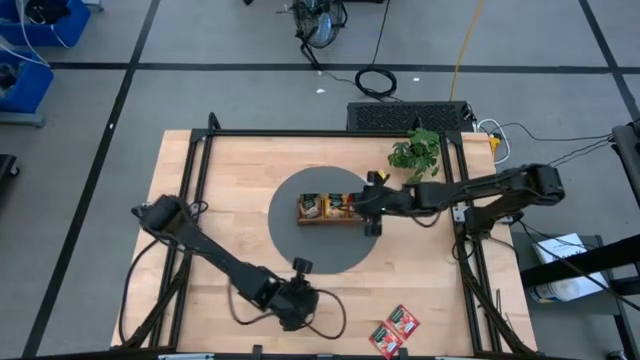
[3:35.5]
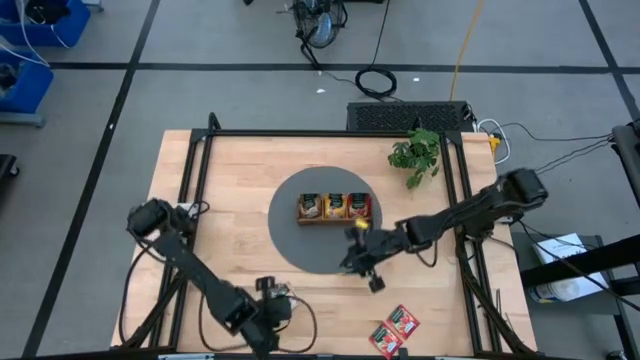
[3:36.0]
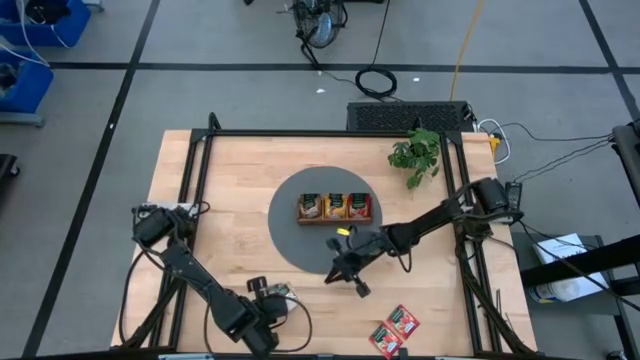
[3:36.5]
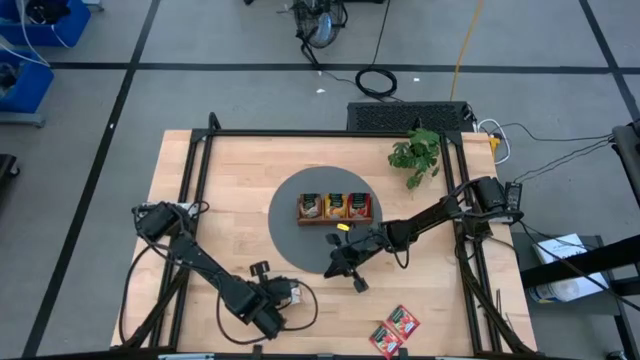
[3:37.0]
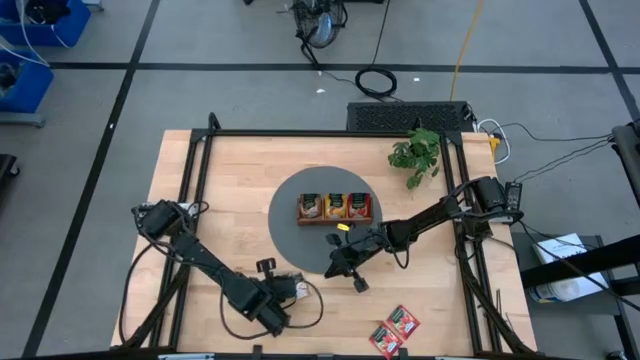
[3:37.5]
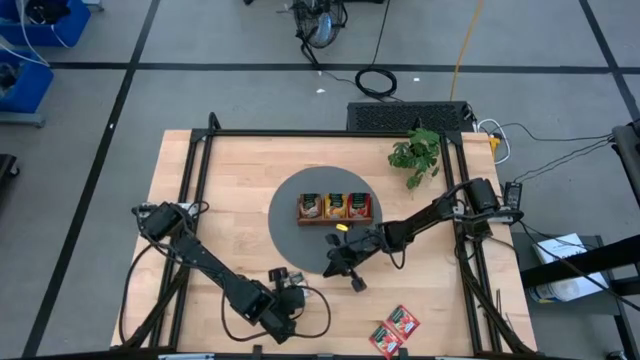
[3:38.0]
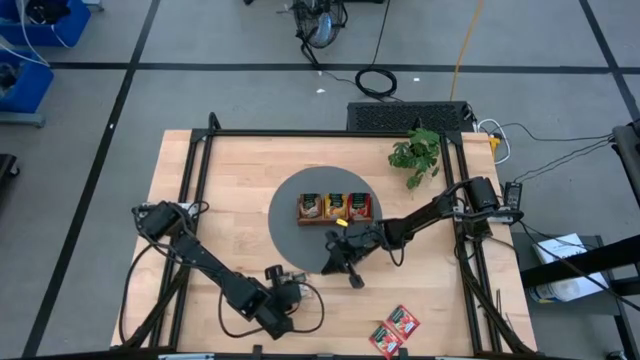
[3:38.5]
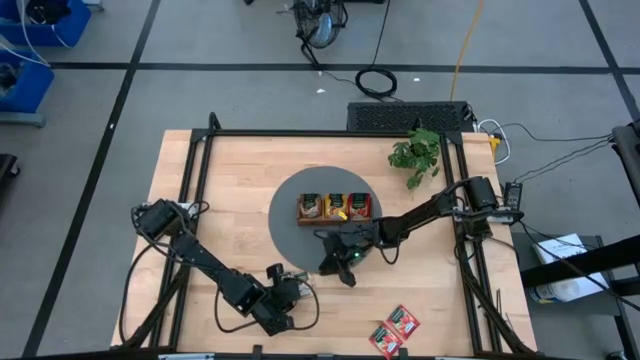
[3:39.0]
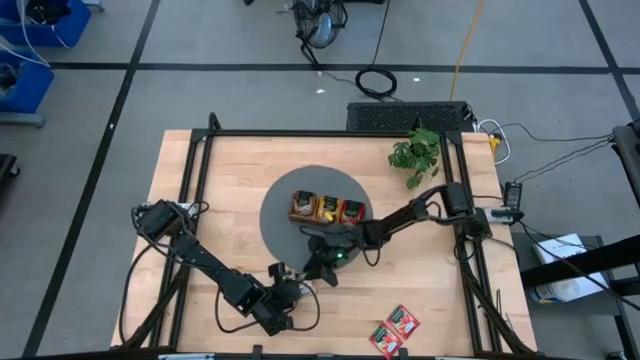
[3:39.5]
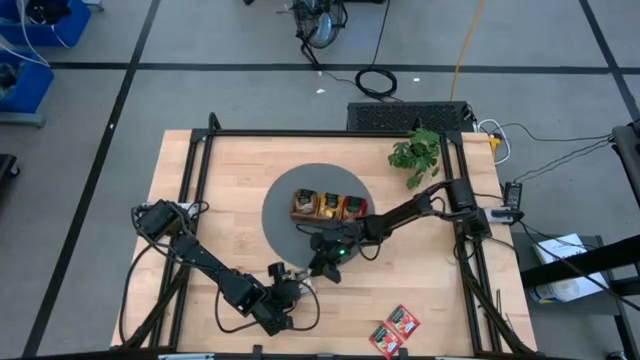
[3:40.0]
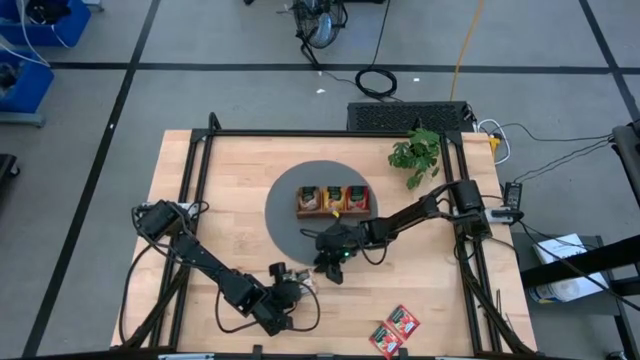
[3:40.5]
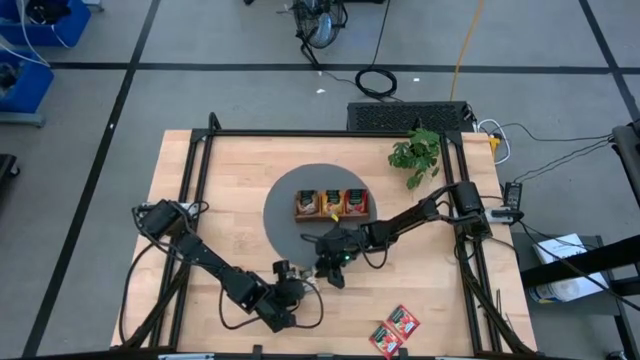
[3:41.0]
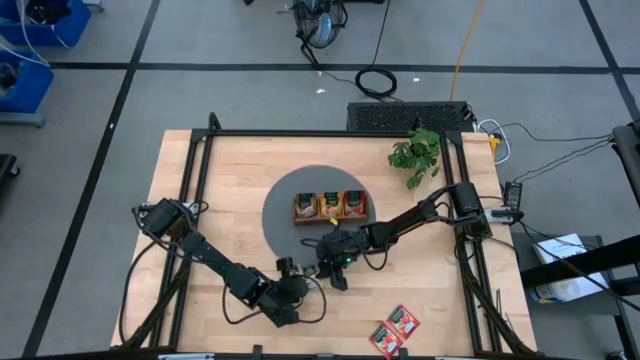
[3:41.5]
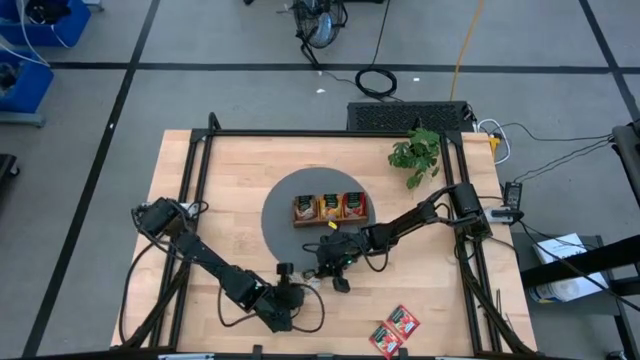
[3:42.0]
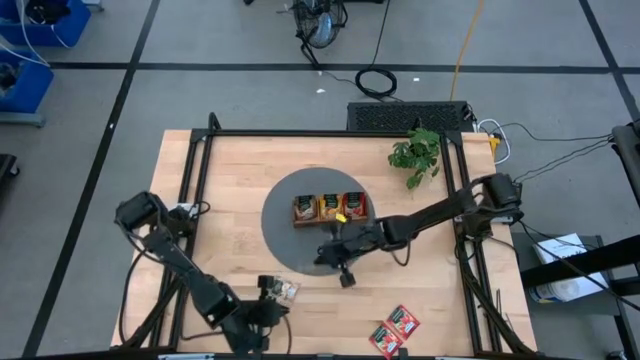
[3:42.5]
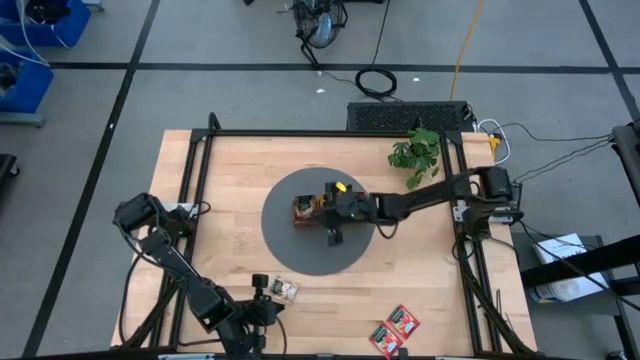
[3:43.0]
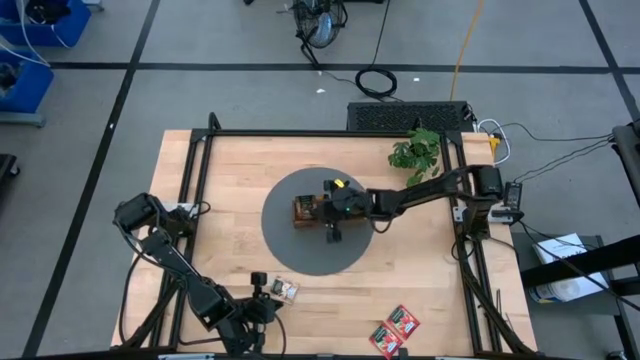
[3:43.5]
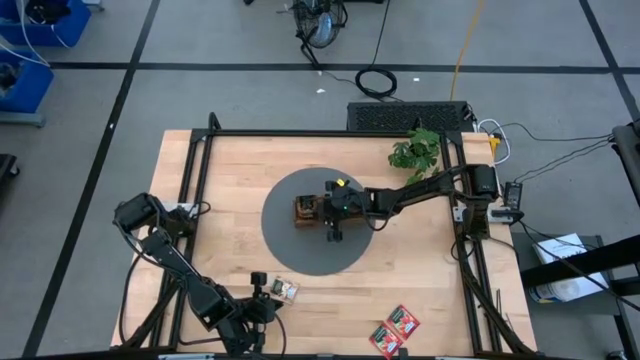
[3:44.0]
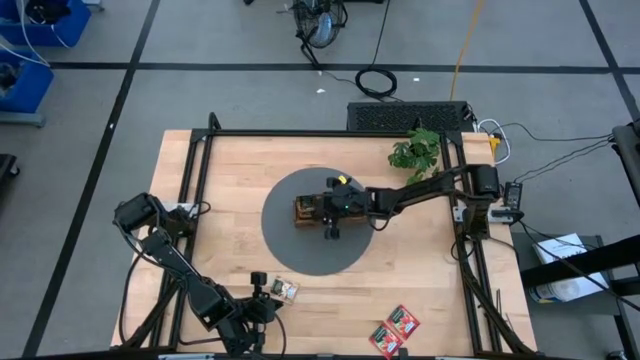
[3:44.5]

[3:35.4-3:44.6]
Task: Pick & Place Tea
Put the right light brown tea sachet into the left section of the wooden organizer

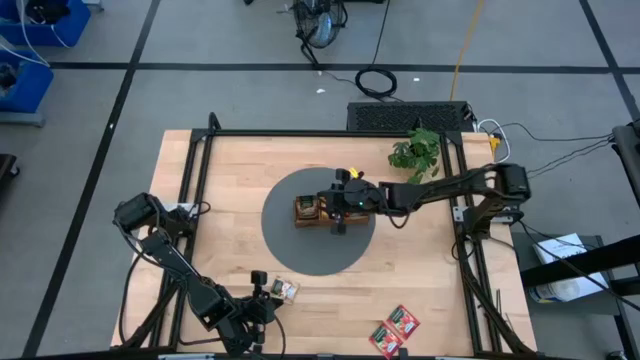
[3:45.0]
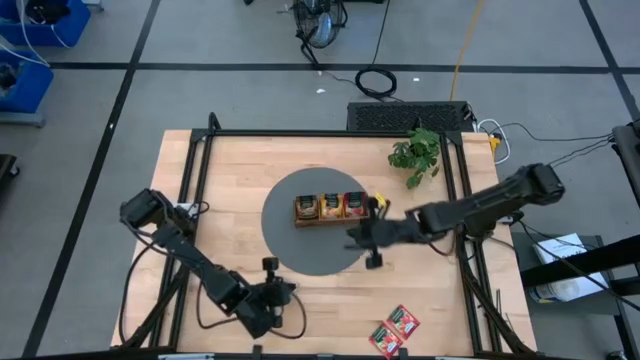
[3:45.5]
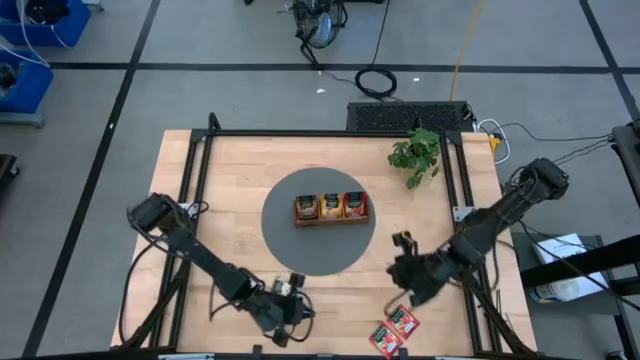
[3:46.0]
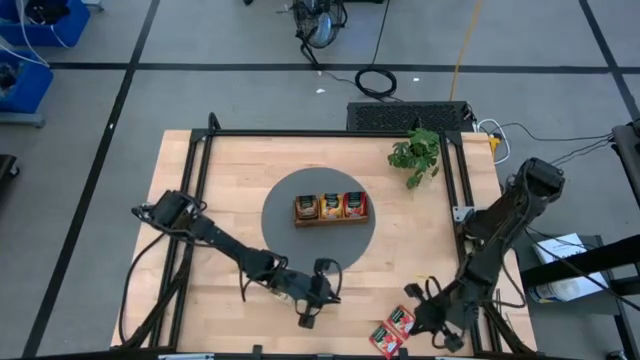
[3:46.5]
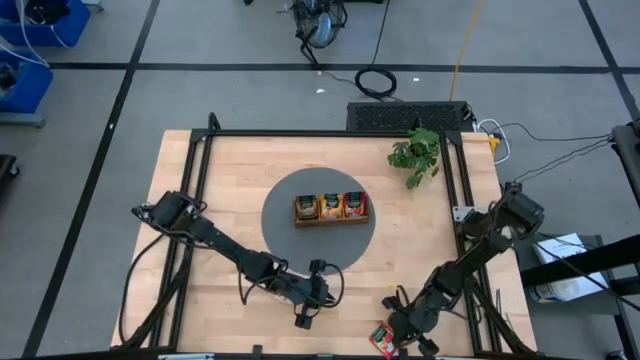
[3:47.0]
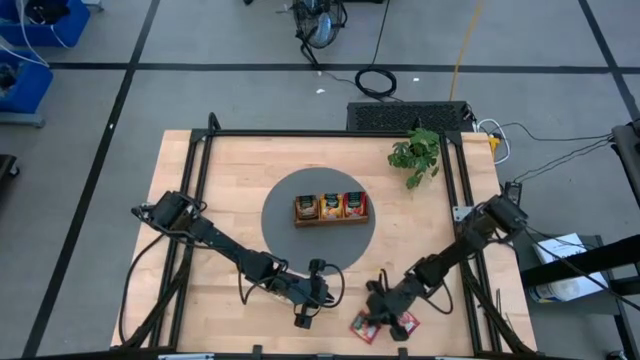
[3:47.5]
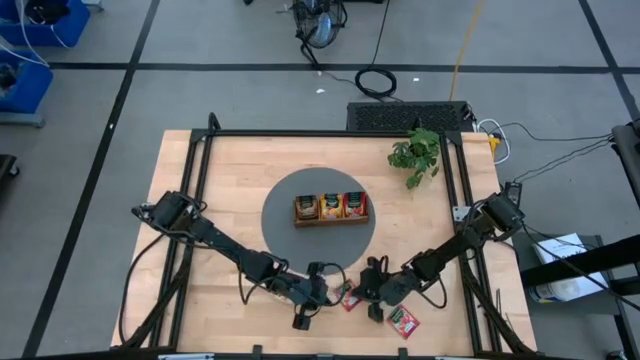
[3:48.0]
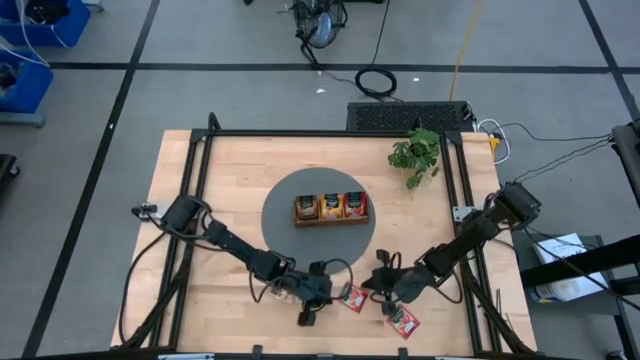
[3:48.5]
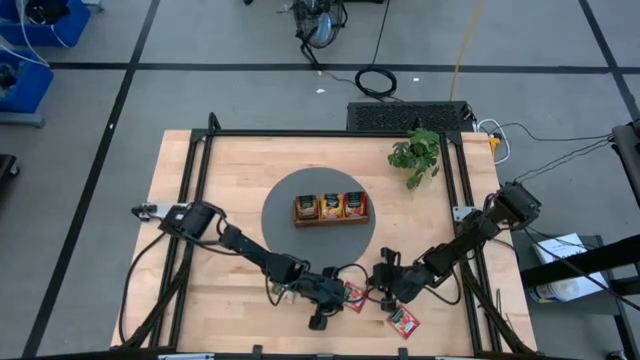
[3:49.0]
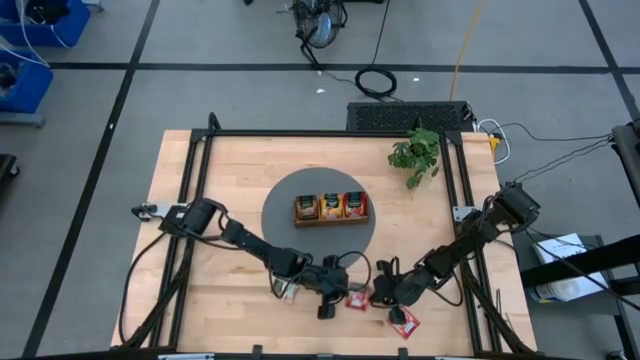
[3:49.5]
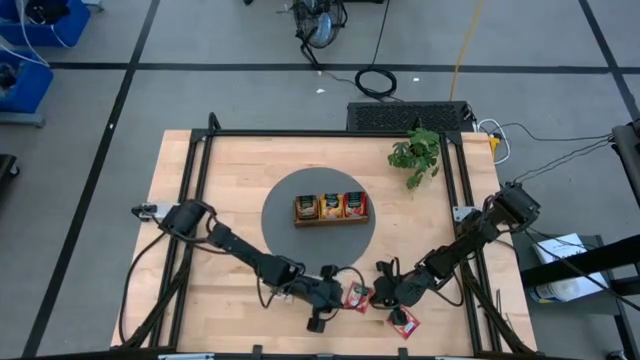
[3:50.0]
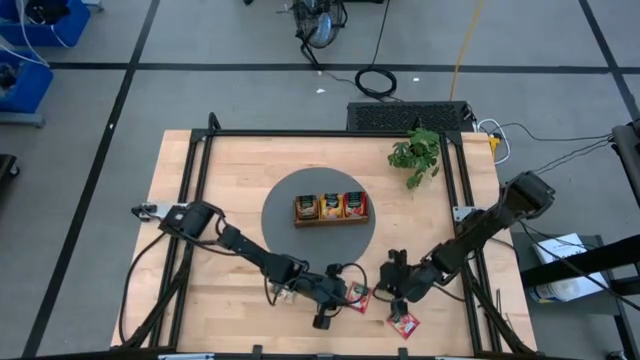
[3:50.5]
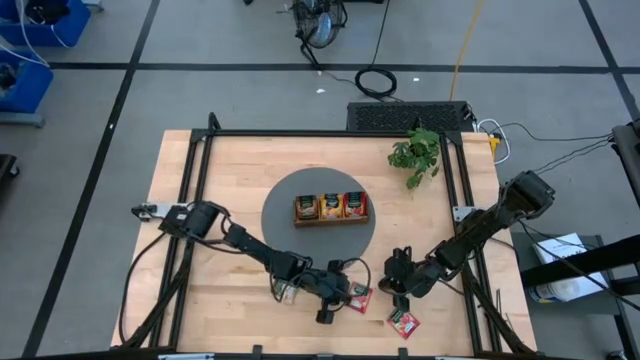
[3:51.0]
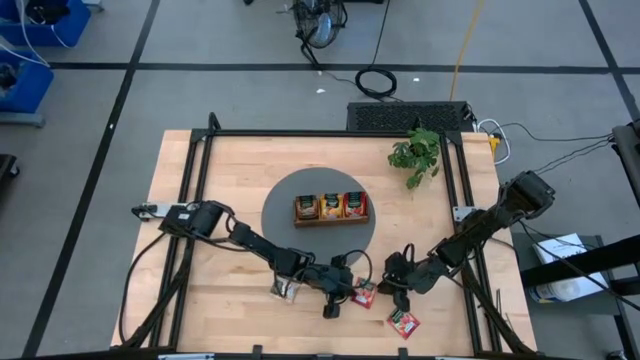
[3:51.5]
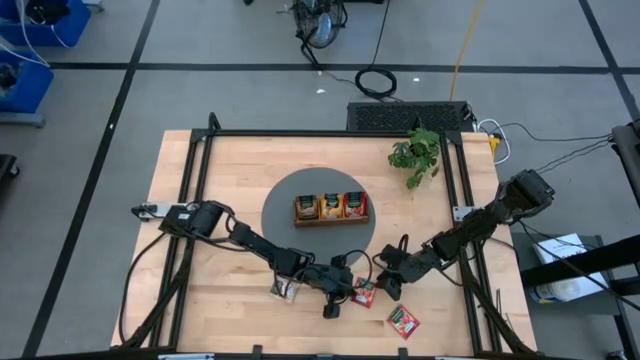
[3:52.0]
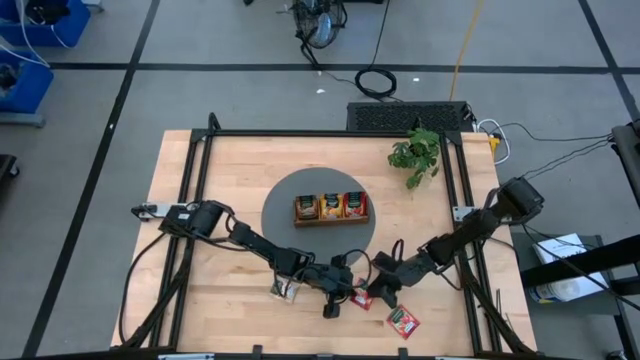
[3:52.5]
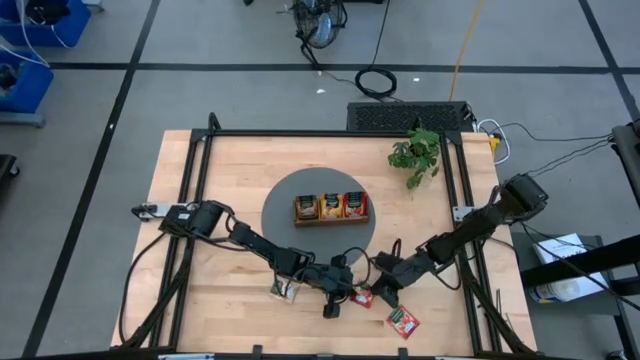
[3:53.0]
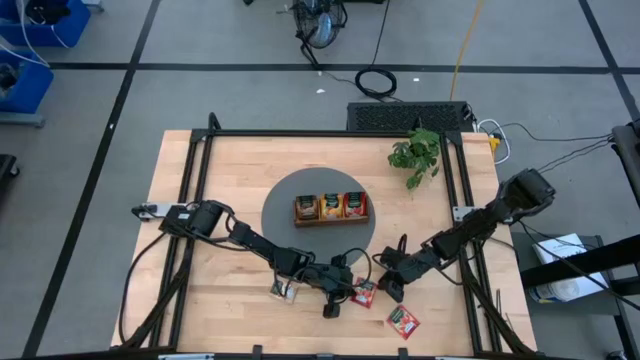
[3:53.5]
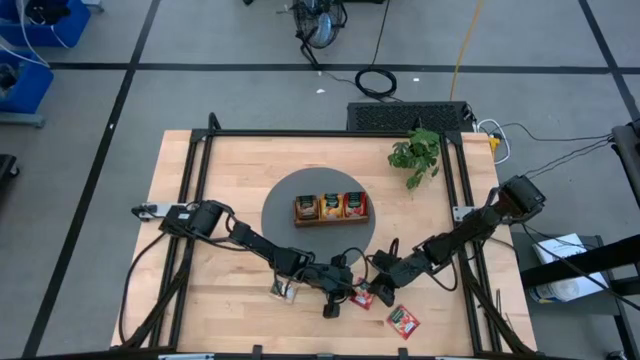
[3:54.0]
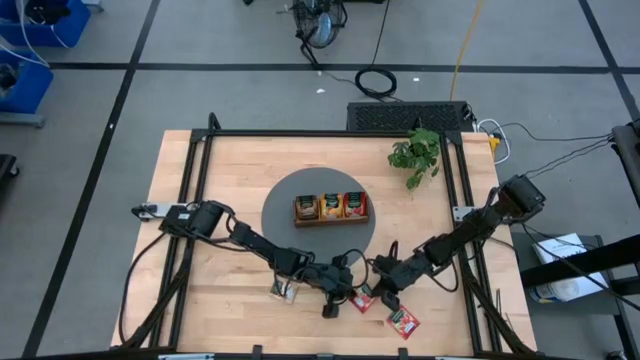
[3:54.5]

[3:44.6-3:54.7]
Put the left red tea sachet into the right section of the wooden organizer

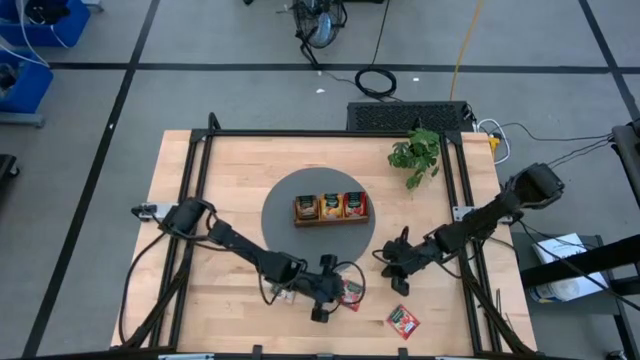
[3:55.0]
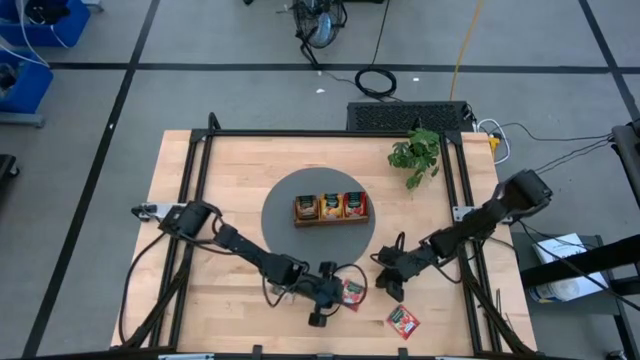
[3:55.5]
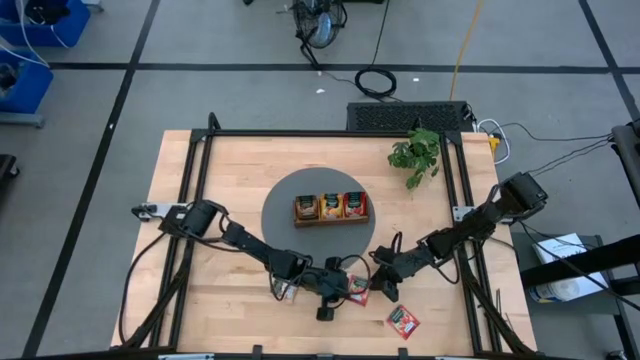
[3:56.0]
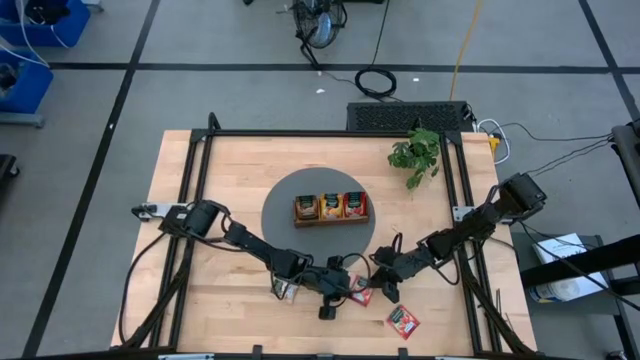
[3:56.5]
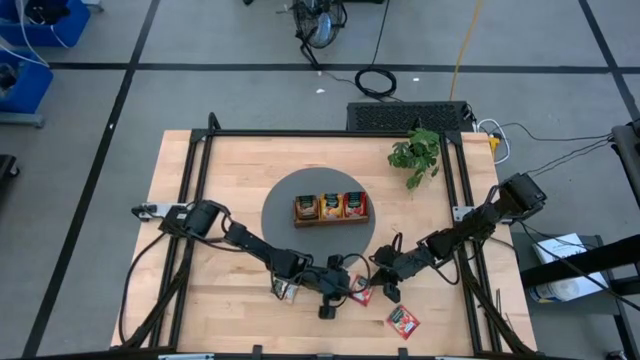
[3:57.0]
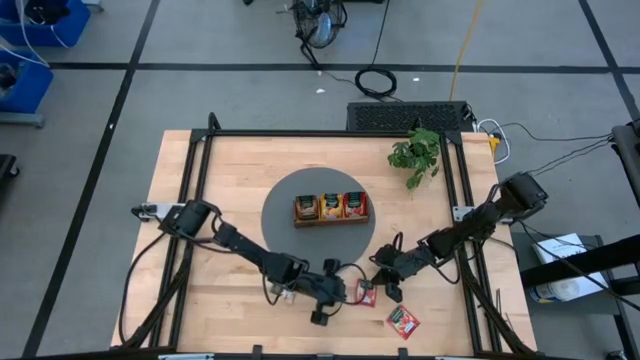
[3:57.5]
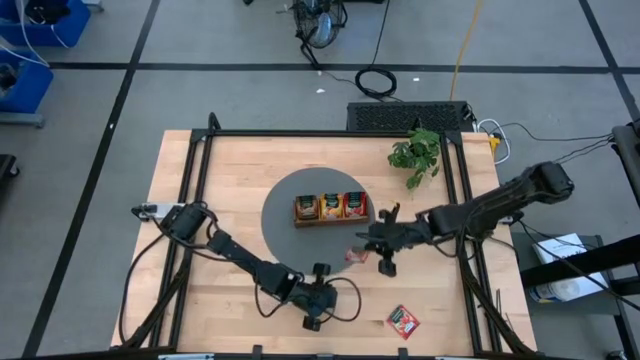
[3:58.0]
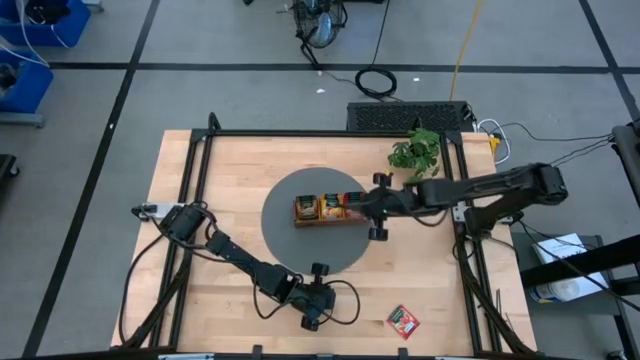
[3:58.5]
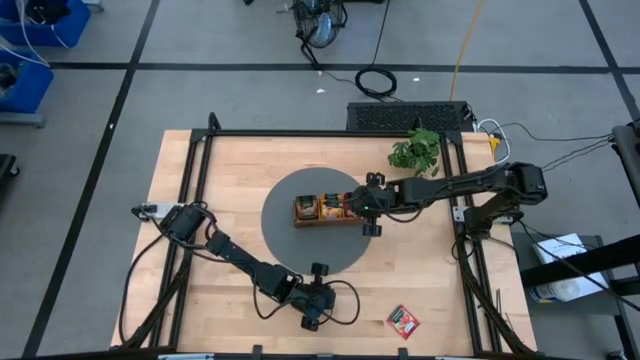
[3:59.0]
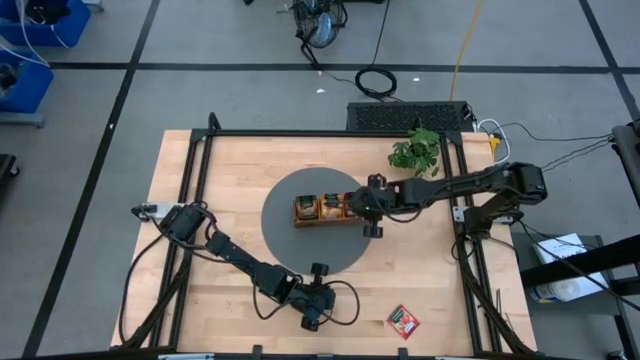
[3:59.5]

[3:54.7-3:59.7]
Put the left red tea sachet into the right section of the wooden organizer
